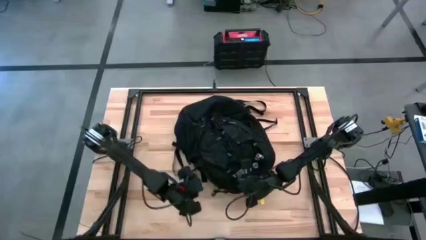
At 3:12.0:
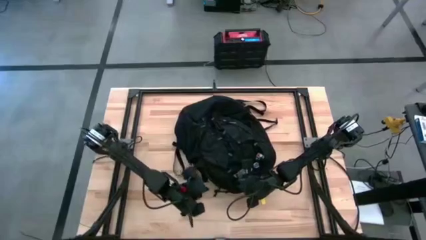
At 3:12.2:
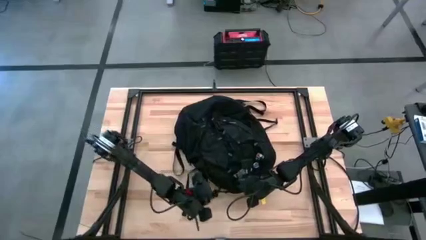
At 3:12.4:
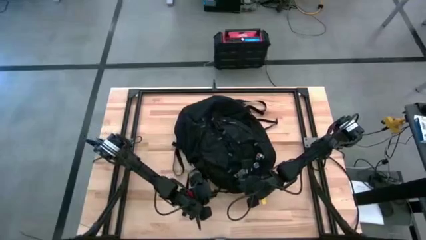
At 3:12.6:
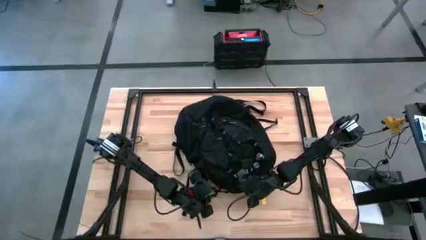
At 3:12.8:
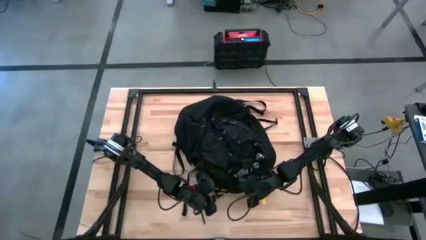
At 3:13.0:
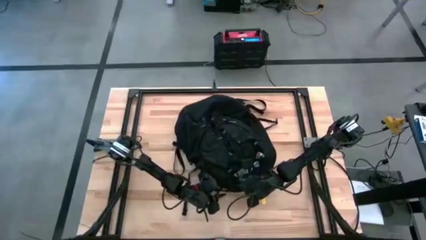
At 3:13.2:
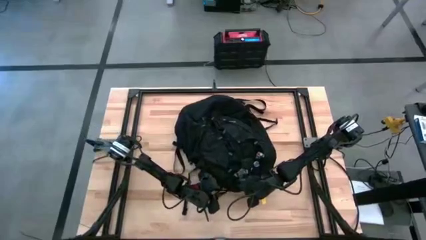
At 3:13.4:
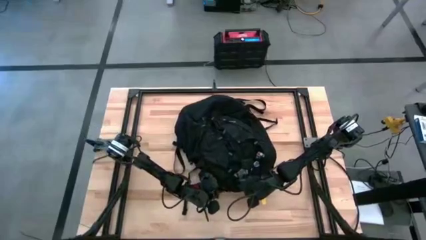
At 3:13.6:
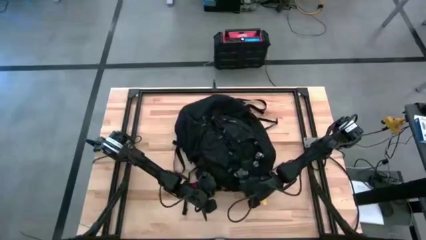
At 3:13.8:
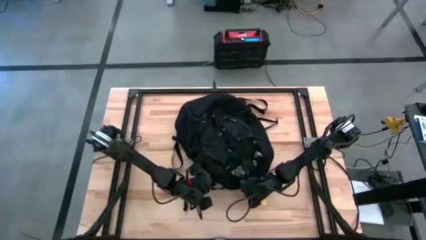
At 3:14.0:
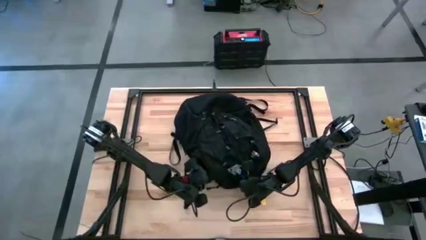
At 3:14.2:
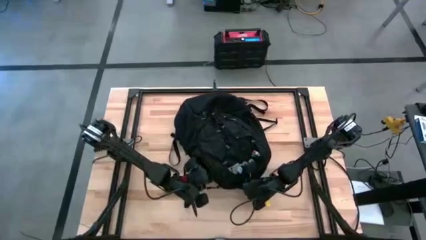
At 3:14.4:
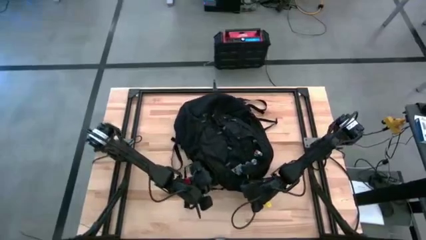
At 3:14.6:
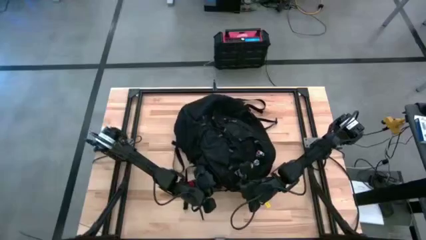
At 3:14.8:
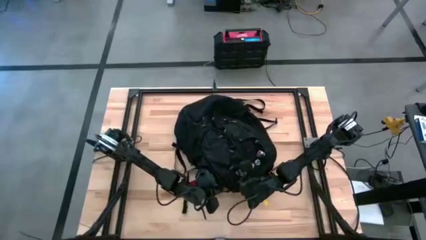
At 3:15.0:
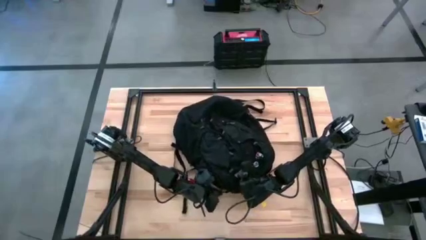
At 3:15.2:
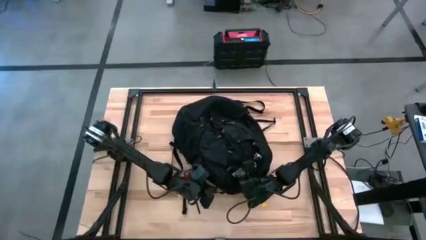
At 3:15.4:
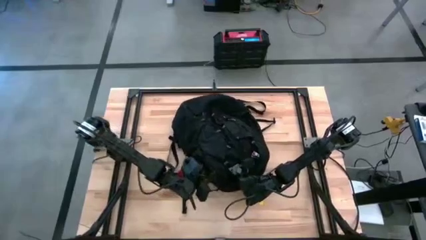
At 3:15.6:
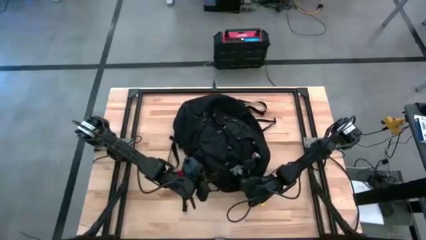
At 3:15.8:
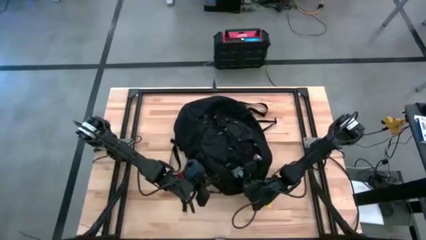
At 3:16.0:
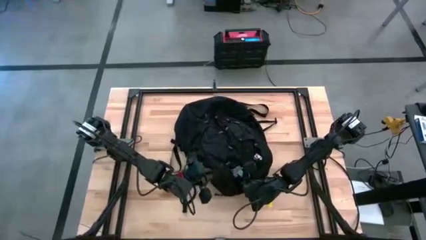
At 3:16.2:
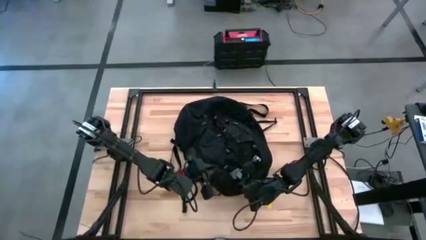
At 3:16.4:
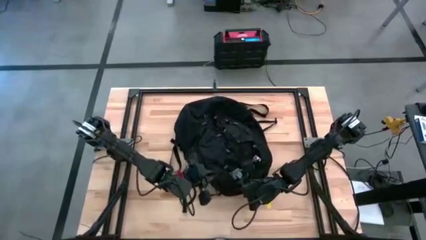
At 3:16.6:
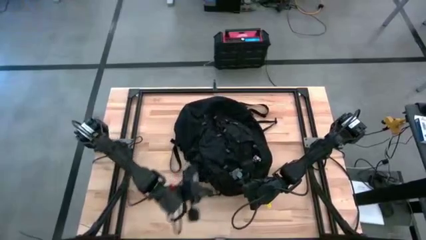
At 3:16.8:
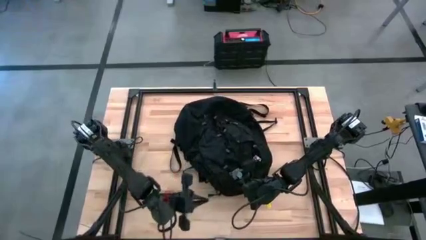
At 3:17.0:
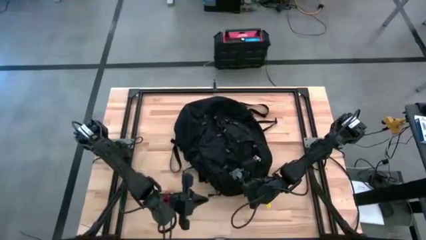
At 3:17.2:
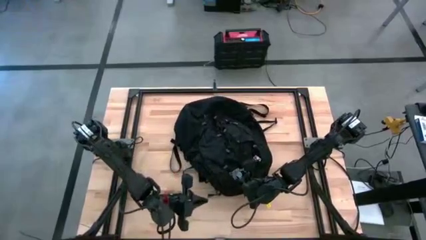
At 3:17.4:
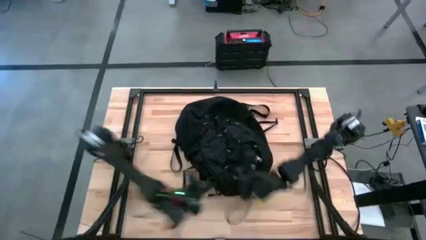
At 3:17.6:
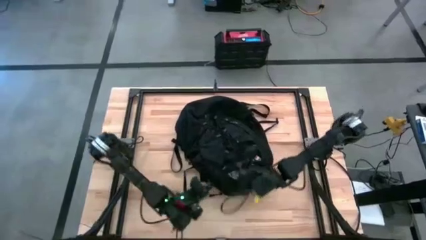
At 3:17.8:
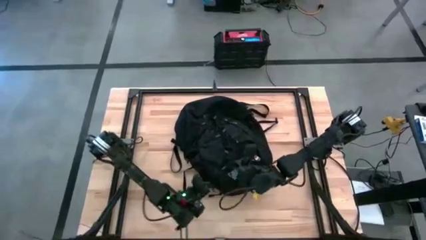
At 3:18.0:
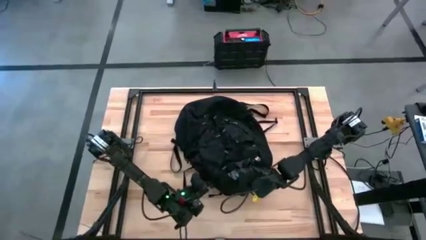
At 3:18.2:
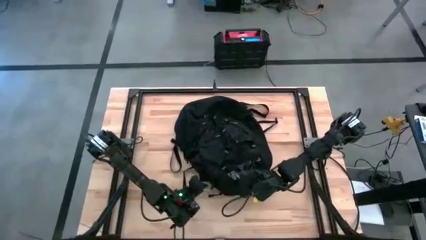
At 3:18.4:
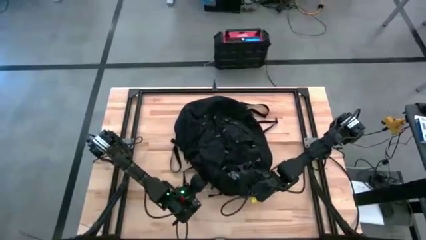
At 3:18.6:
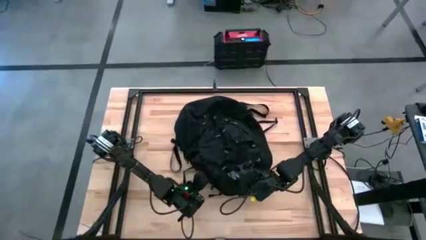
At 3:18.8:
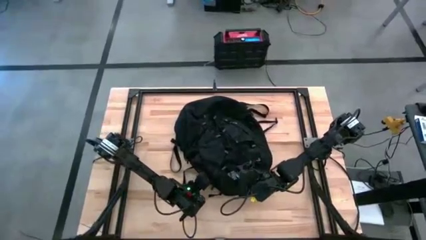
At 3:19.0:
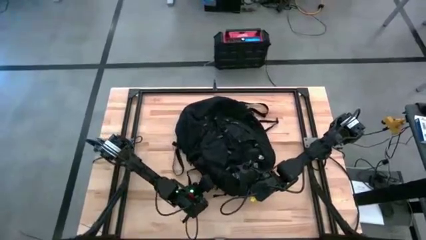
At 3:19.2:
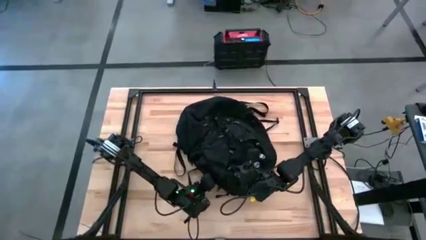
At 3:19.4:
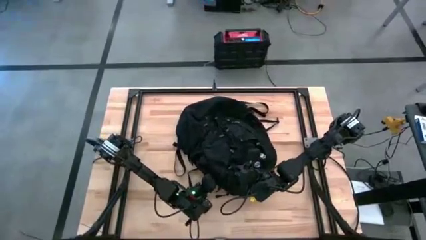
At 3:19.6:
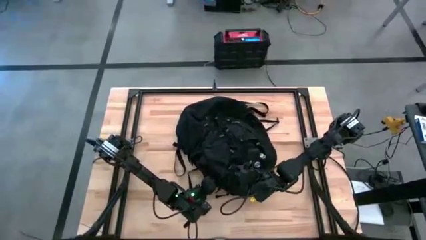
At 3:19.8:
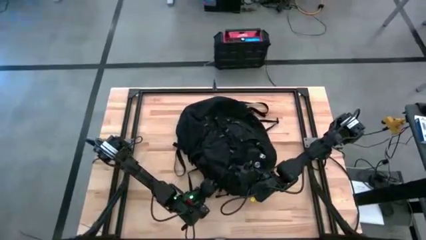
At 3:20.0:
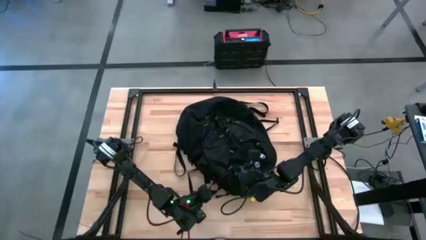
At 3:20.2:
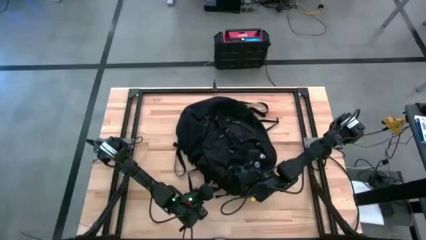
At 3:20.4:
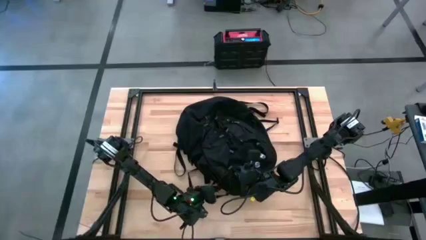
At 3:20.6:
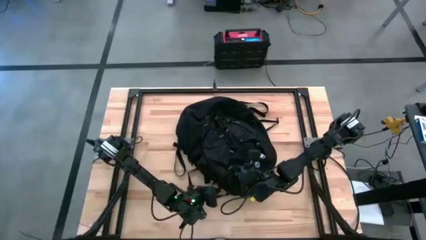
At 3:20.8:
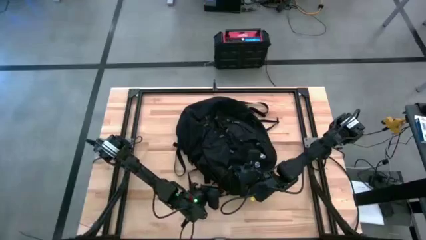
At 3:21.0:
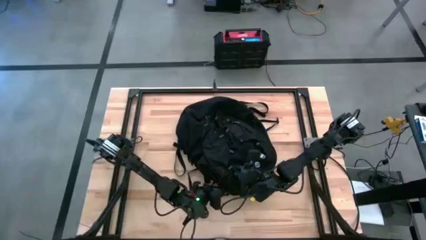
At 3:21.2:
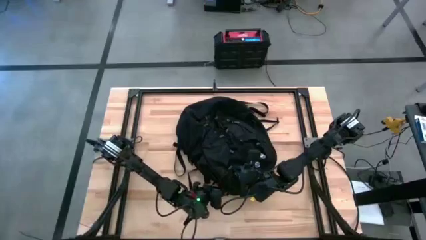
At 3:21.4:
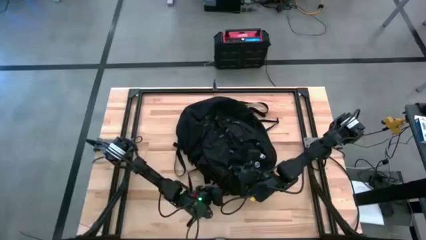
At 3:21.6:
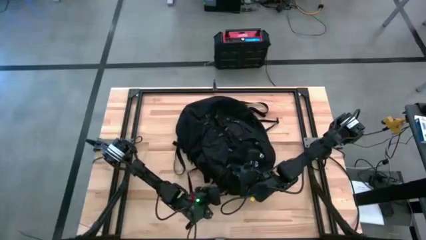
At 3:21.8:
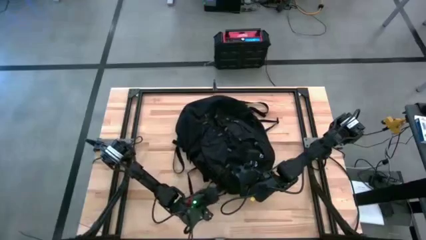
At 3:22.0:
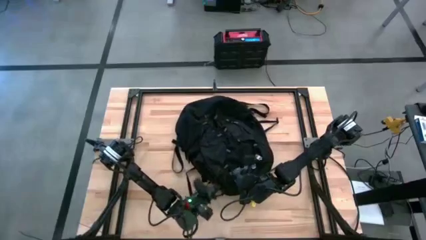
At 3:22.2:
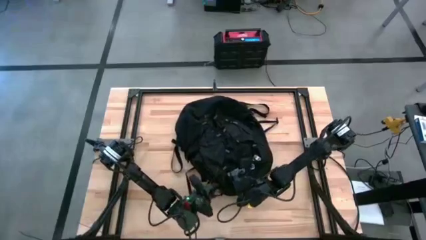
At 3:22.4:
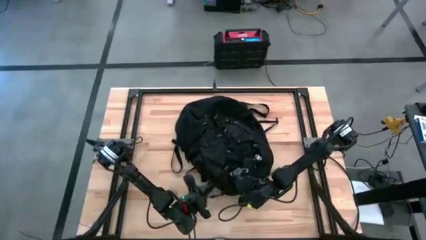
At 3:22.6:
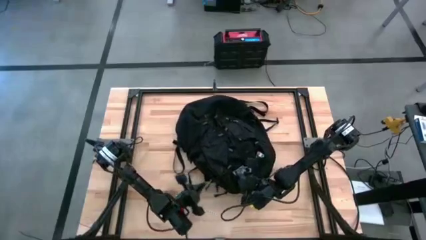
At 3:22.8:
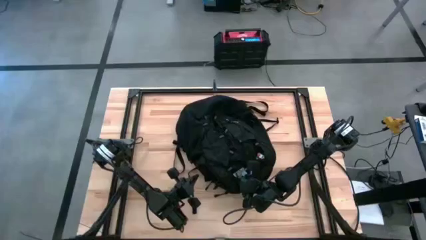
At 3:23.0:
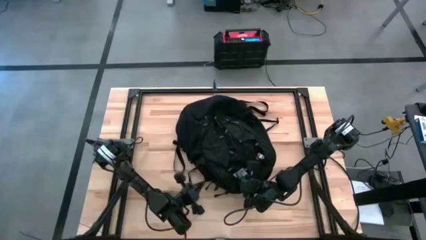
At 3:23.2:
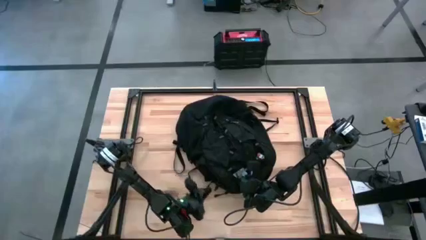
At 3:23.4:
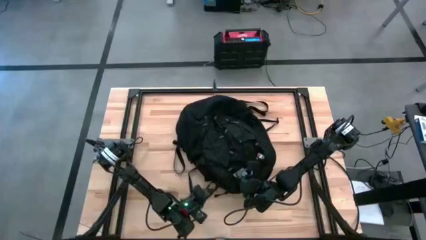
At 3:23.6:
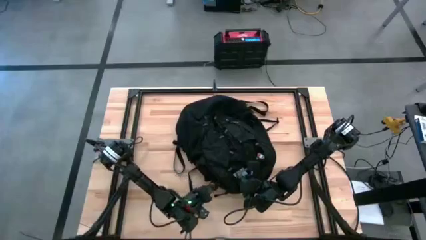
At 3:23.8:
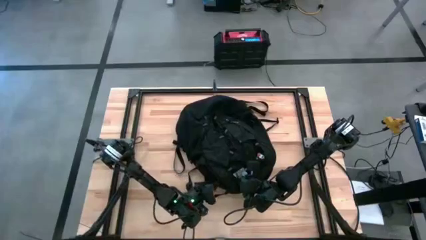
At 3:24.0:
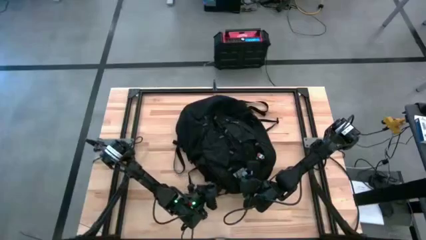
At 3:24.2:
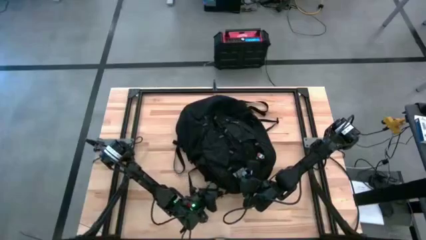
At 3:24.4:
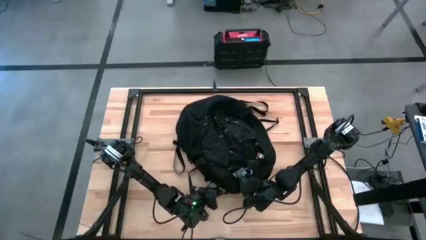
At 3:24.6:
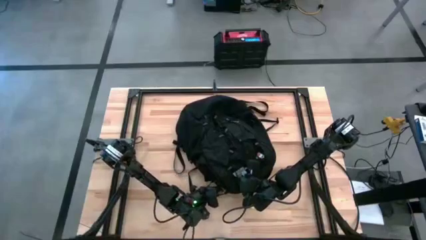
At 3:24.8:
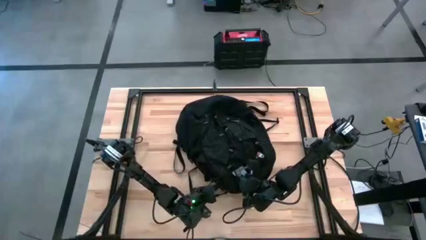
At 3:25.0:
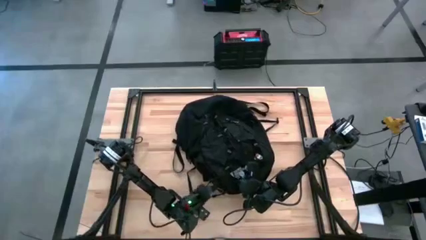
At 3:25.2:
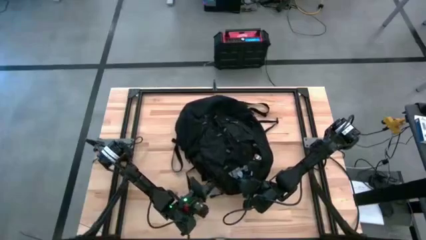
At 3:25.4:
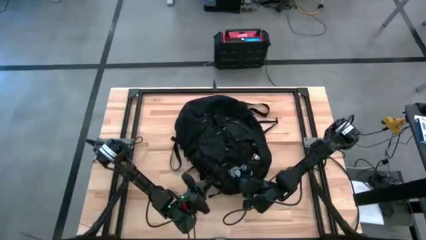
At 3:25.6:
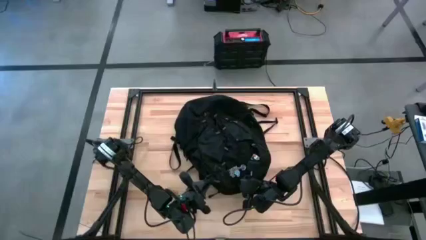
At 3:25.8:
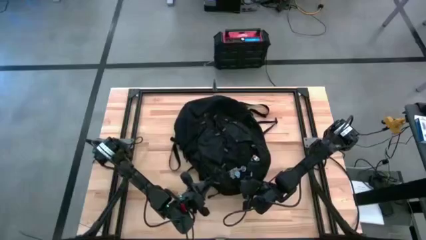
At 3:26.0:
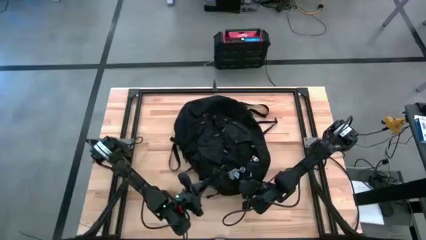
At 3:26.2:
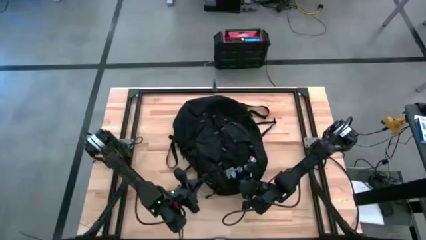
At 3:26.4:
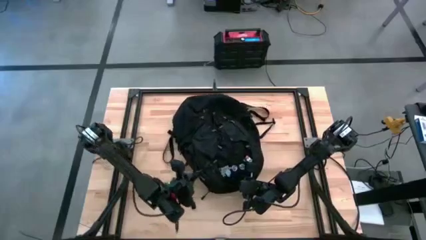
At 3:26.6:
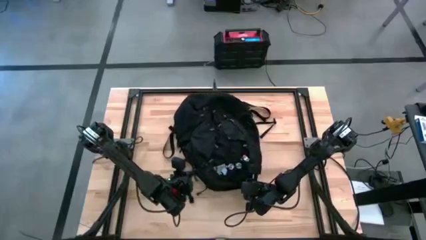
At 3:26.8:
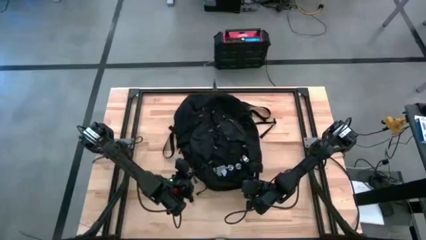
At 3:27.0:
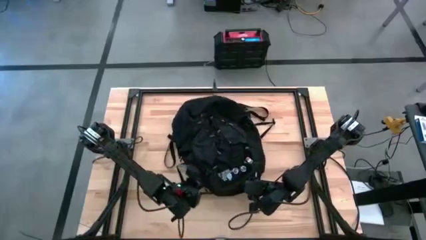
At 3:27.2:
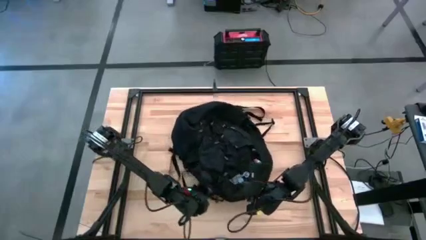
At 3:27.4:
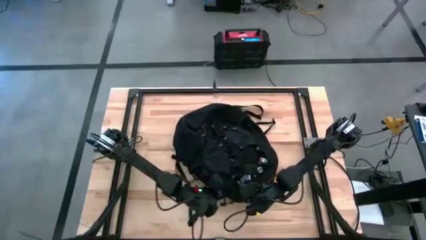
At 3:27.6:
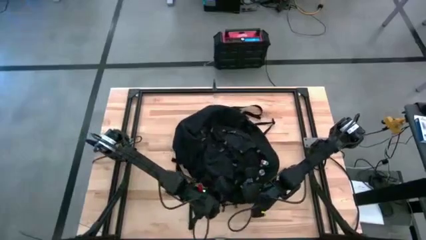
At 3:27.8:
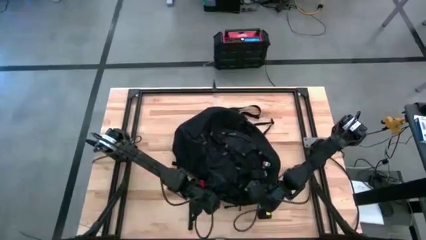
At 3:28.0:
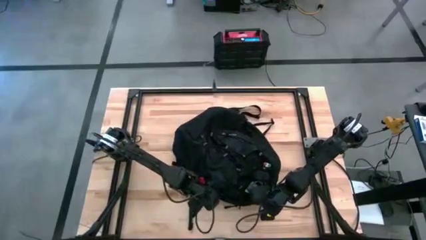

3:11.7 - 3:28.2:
Task: Unpack backpack
Close the black backpack

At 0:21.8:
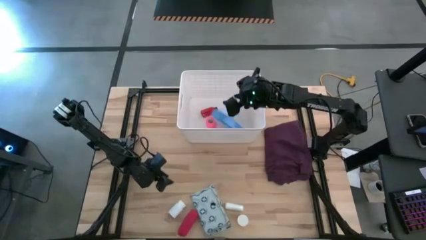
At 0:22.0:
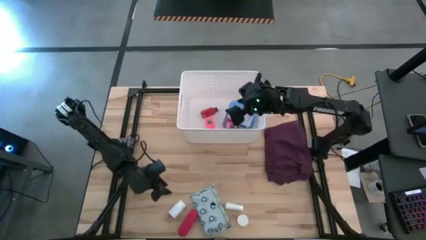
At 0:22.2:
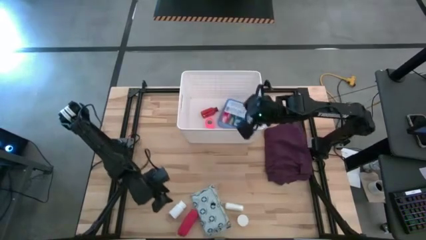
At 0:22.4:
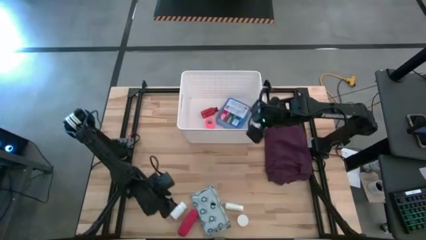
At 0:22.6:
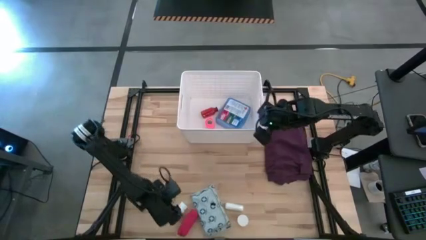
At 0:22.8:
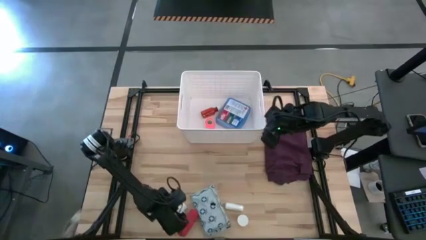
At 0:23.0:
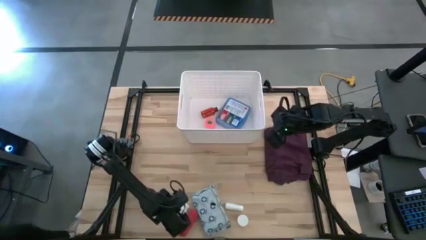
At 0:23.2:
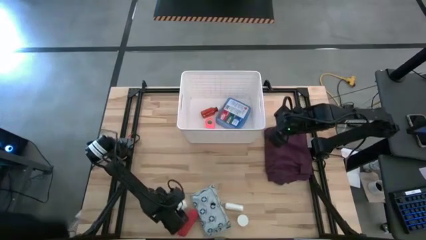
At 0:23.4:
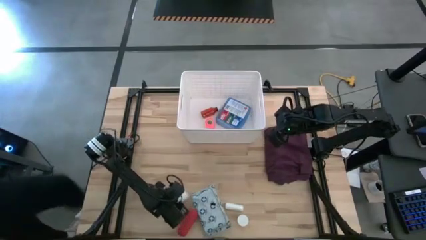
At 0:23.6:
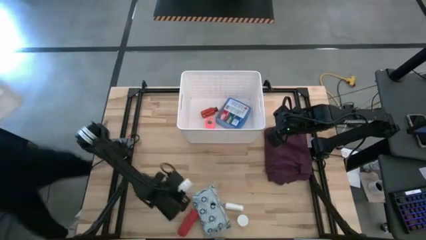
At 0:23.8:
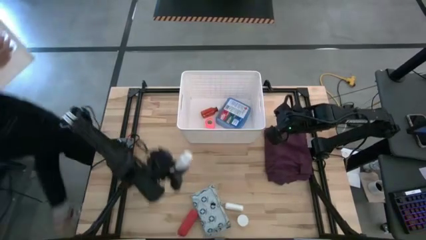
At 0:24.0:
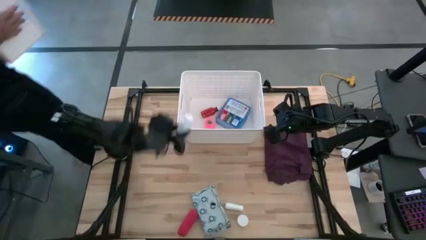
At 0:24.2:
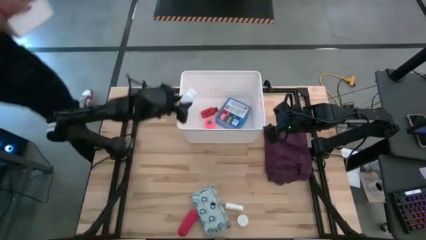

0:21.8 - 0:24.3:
Task: Pick & place medical supplies in basket/bin
Put the white pill bottle into the white bin
